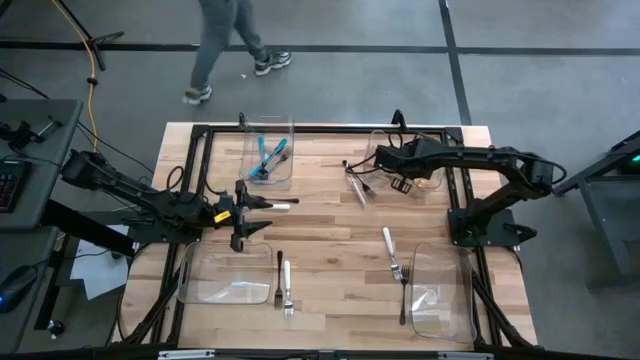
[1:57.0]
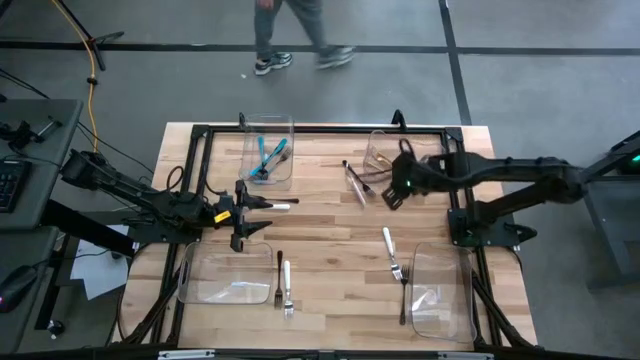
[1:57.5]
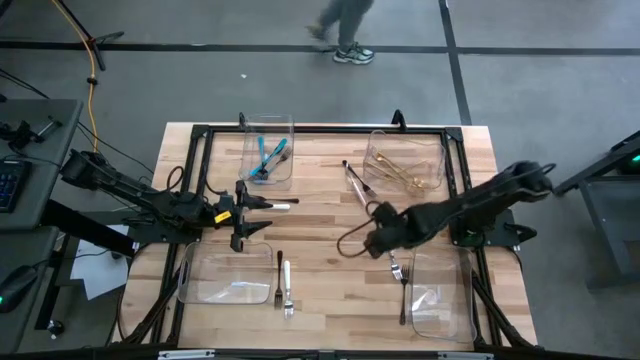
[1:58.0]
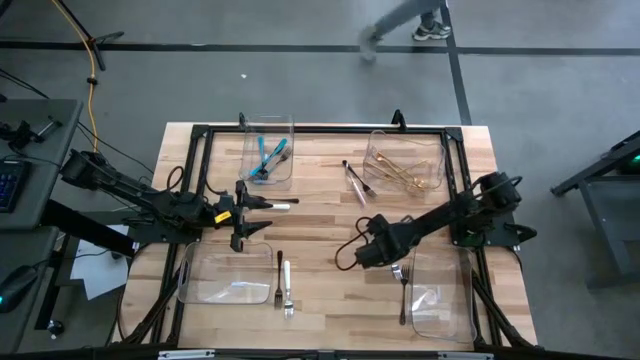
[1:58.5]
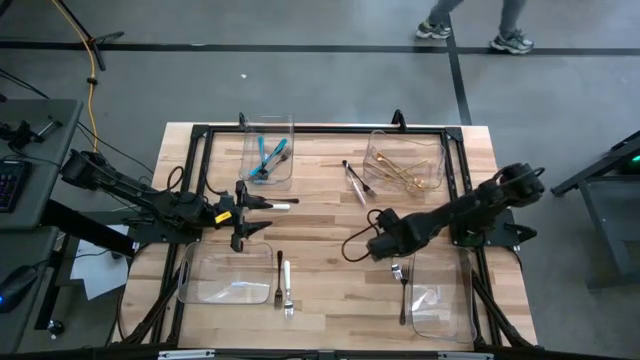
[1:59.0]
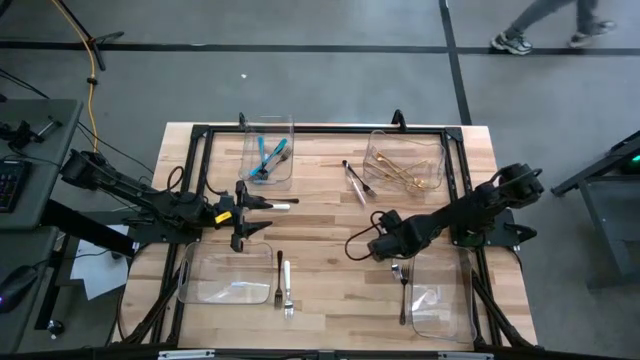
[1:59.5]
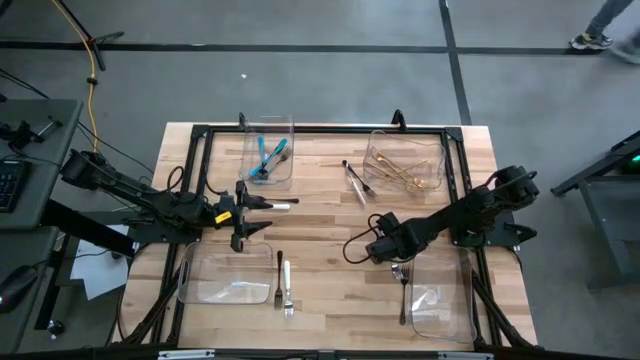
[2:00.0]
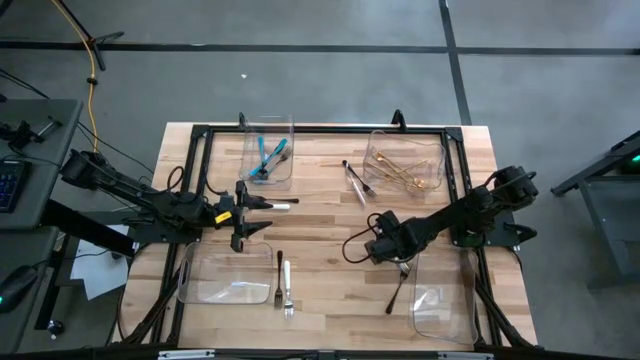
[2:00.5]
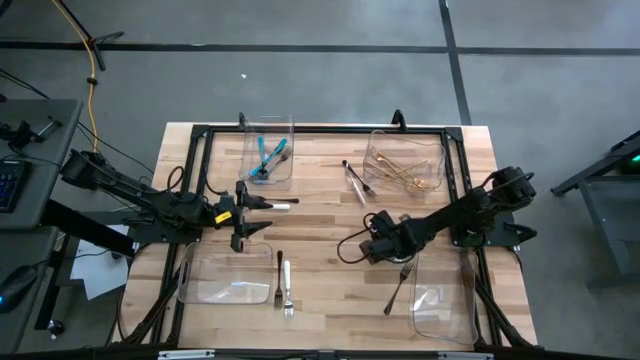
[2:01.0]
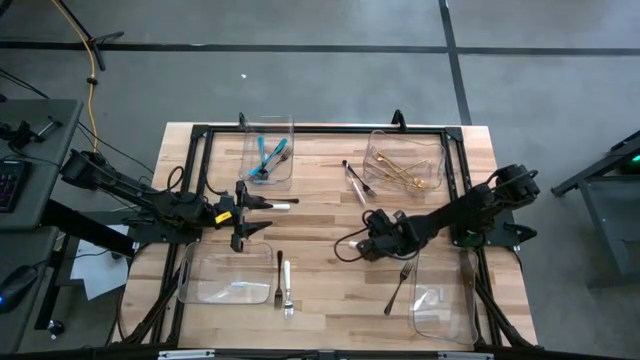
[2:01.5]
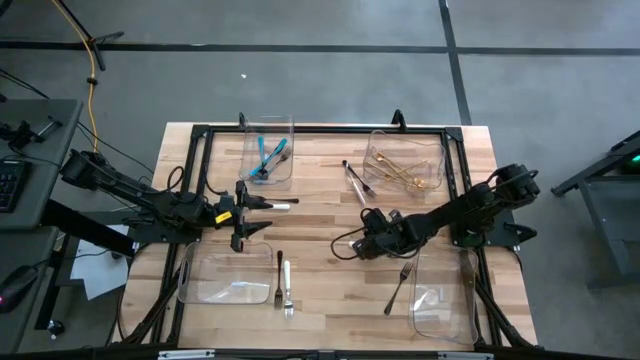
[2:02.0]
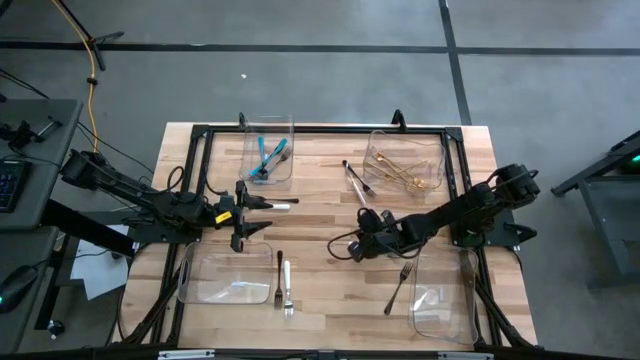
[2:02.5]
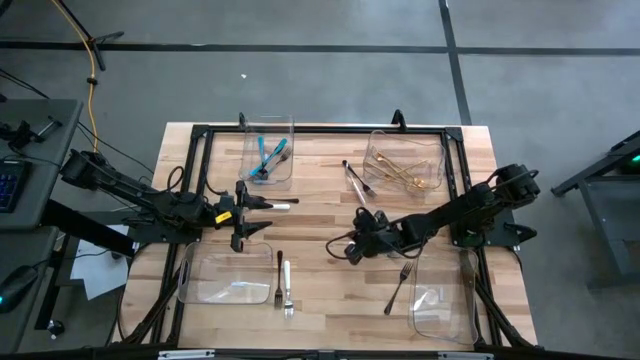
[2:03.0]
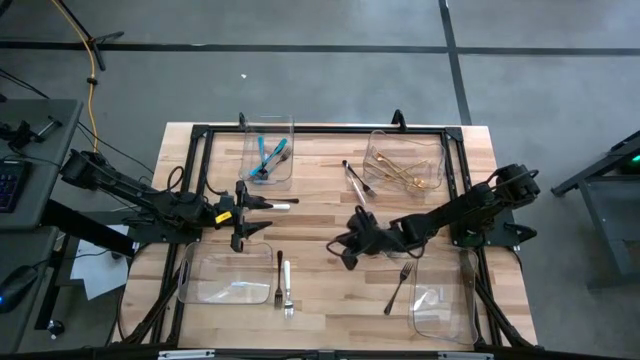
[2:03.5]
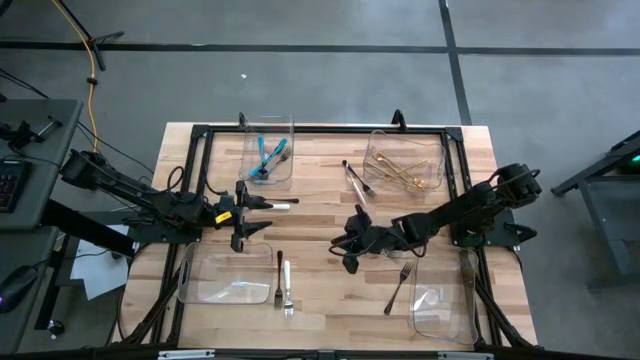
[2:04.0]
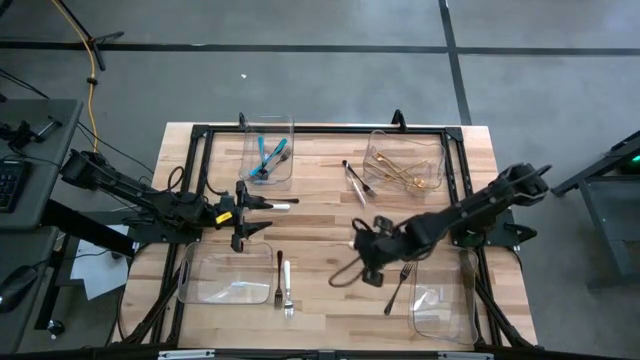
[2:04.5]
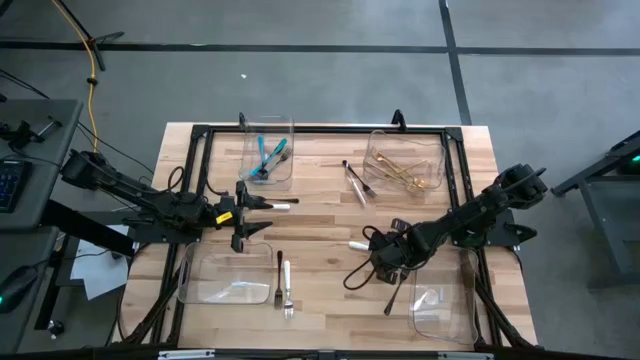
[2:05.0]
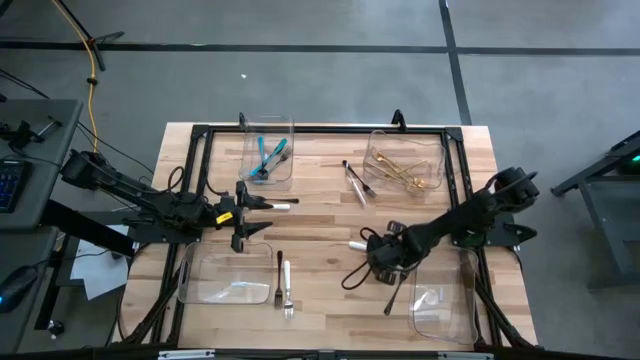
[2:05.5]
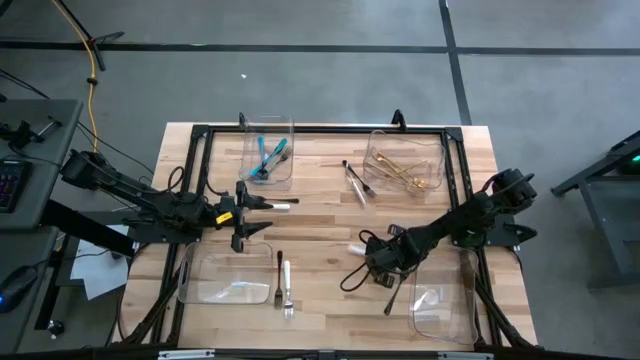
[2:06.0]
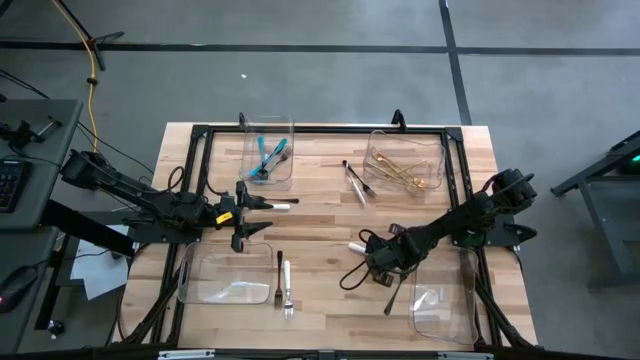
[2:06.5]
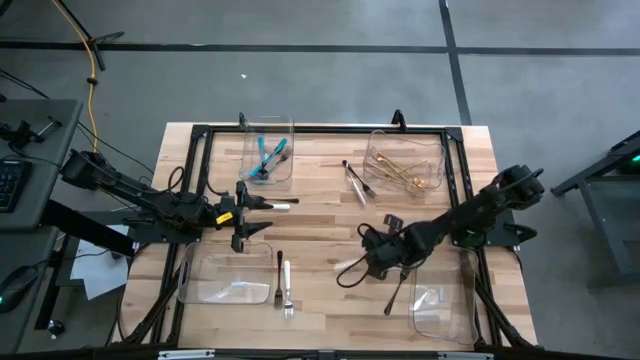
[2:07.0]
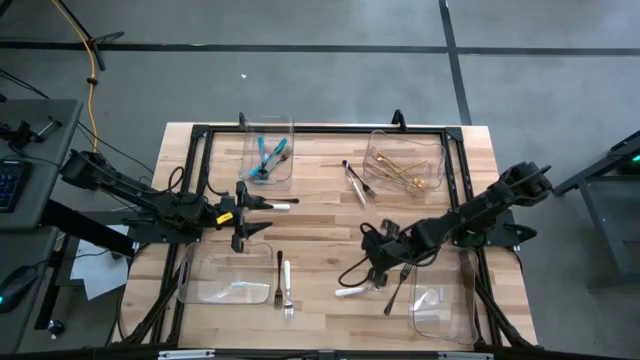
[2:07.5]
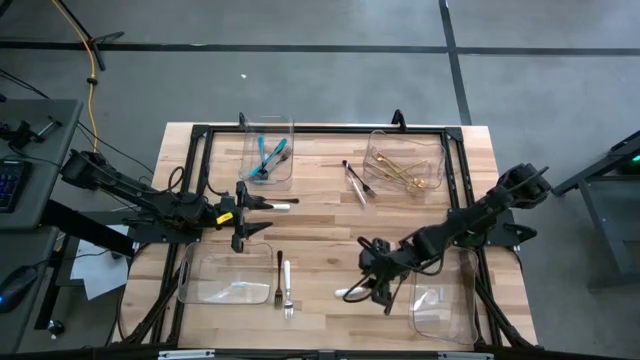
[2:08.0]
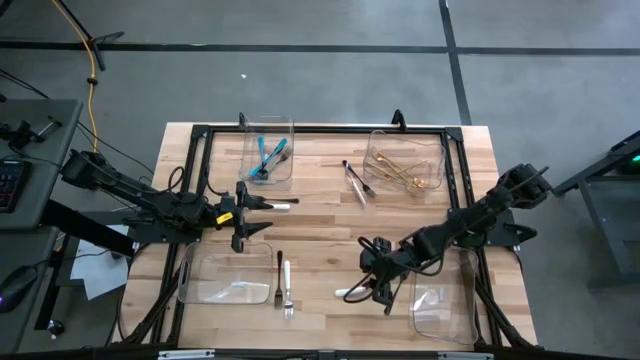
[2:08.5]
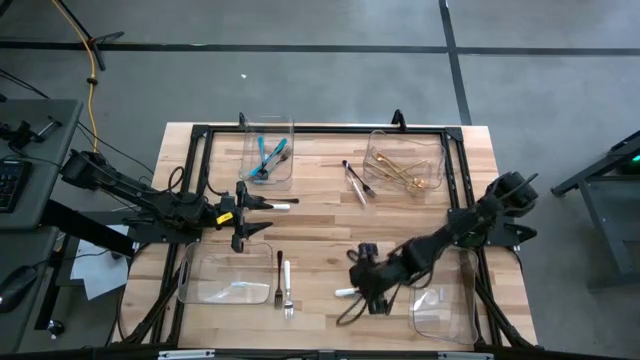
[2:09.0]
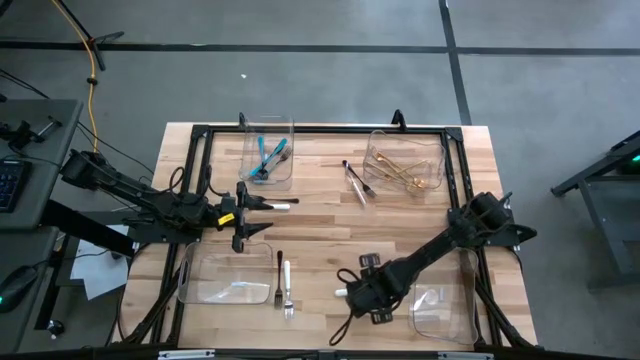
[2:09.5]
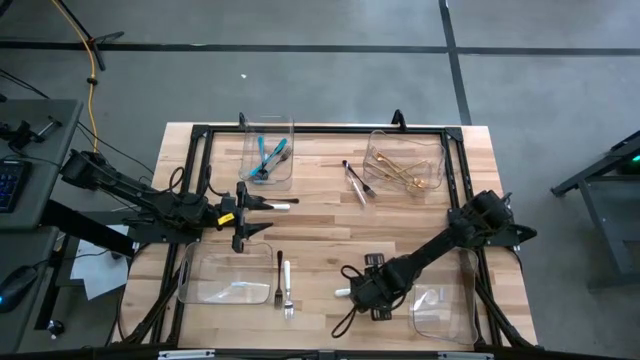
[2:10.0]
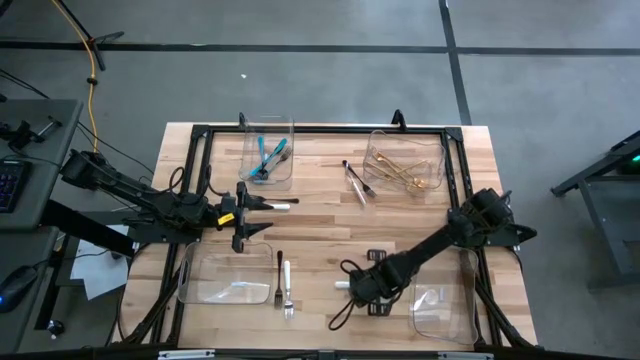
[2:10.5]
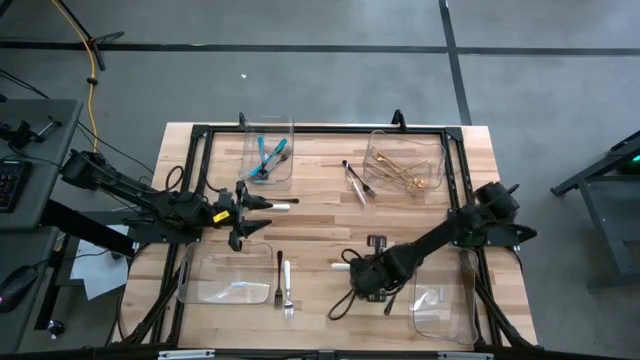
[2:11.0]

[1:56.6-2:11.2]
Task: Sort silverware by color (type)
Put the white fork into the bottom left transparent bin

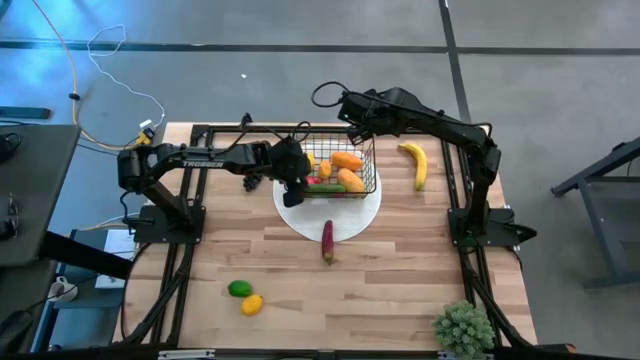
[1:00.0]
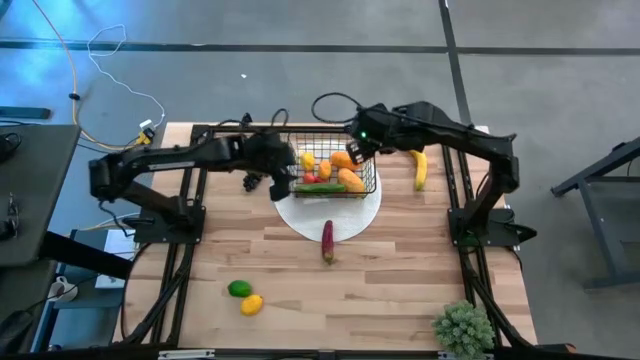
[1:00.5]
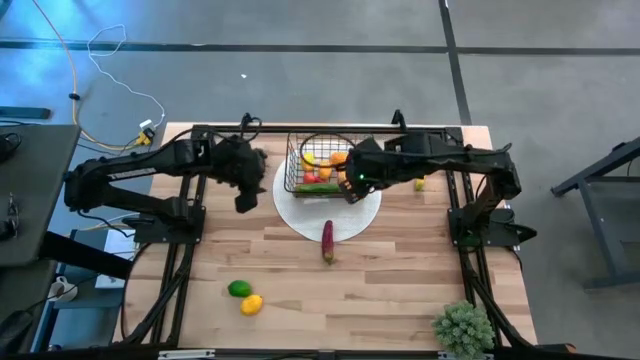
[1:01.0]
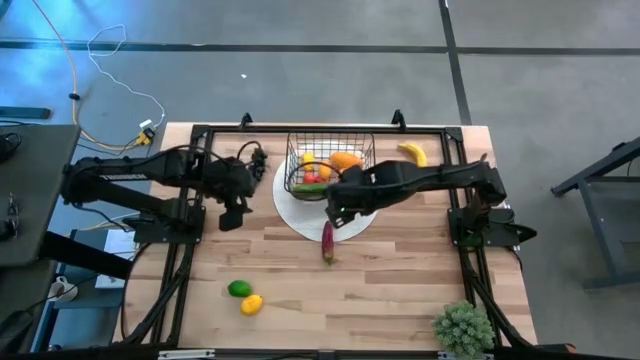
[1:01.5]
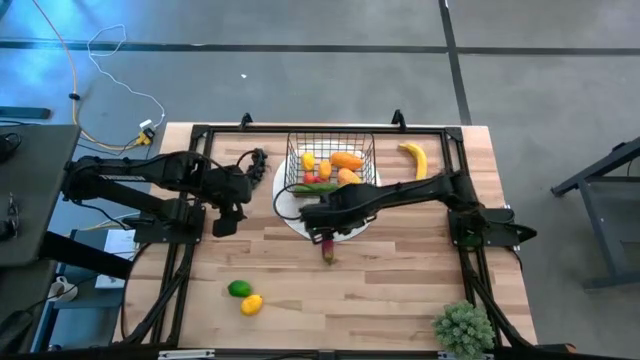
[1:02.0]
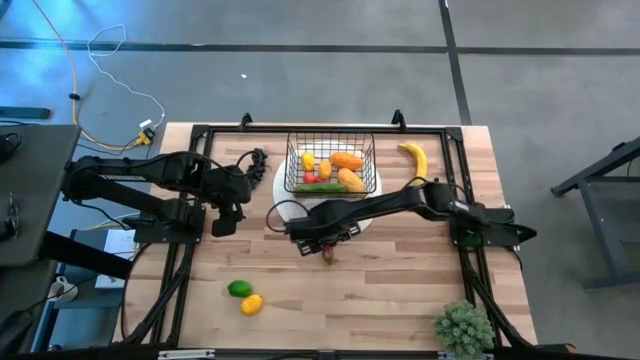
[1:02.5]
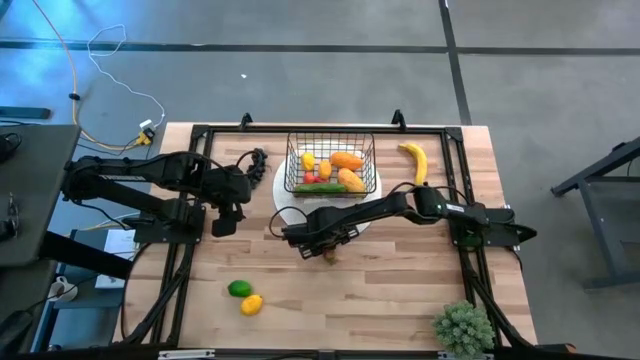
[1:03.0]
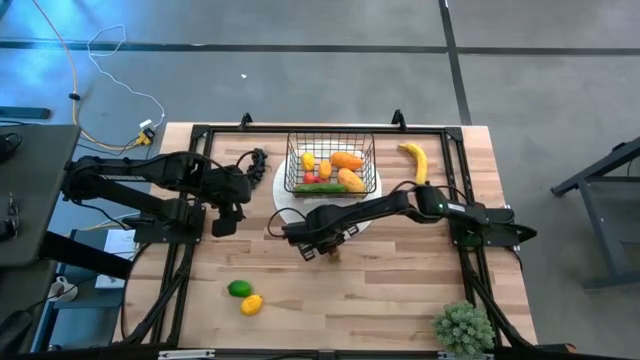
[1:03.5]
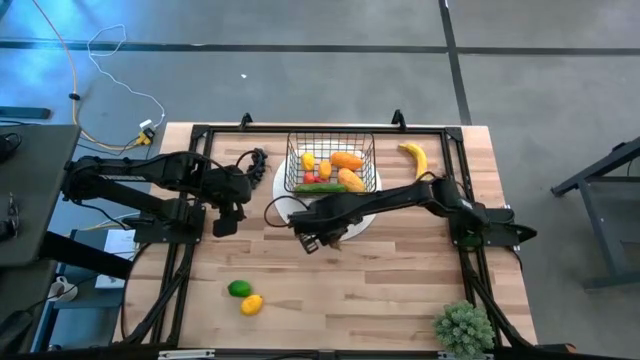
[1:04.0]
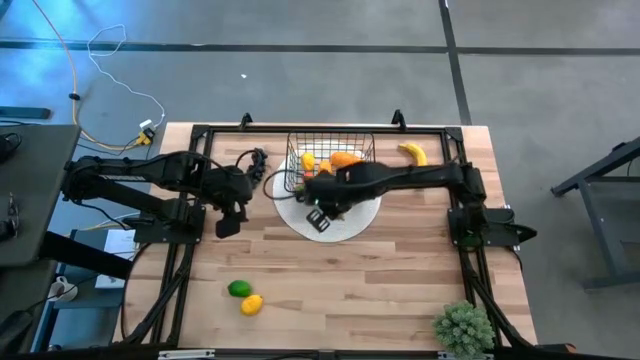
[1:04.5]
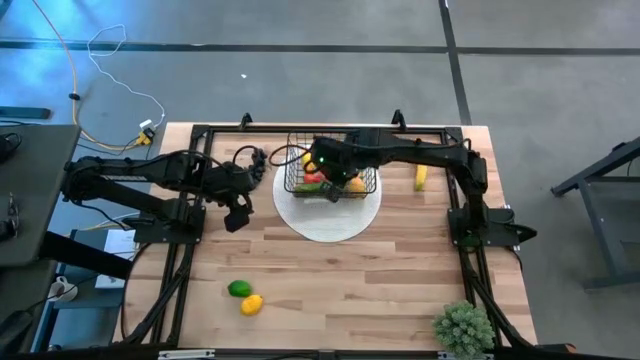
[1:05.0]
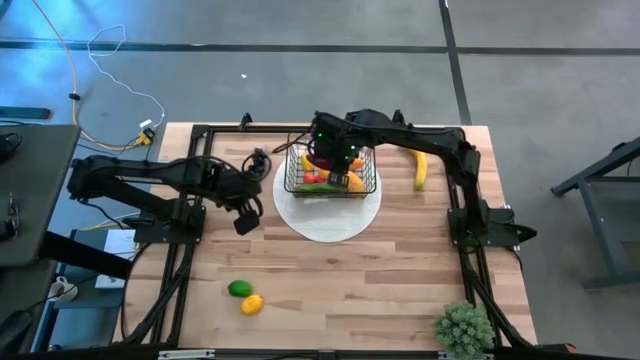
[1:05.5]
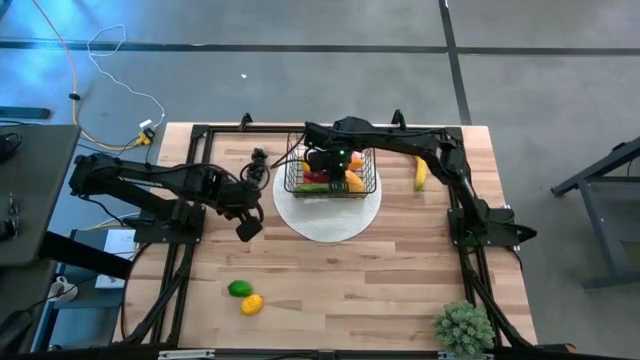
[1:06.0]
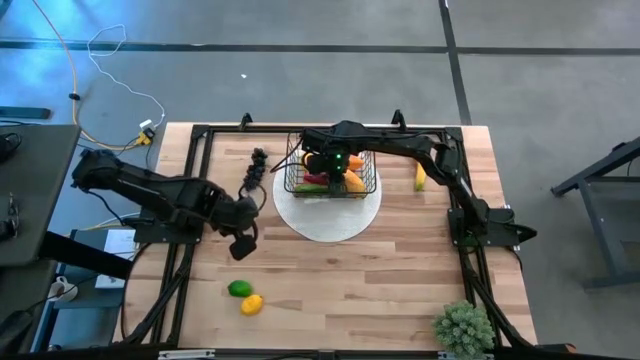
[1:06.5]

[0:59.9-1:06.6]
Task: Build produce basket
Put the bell pepper into the wire basket
